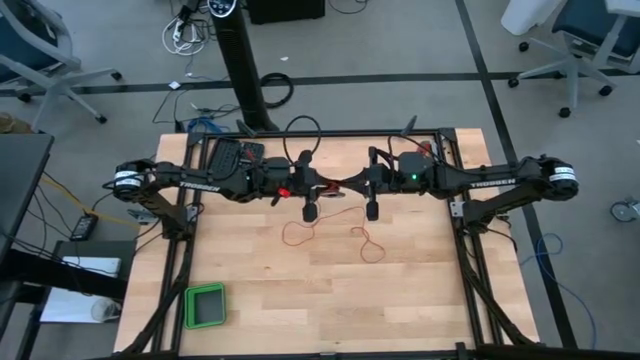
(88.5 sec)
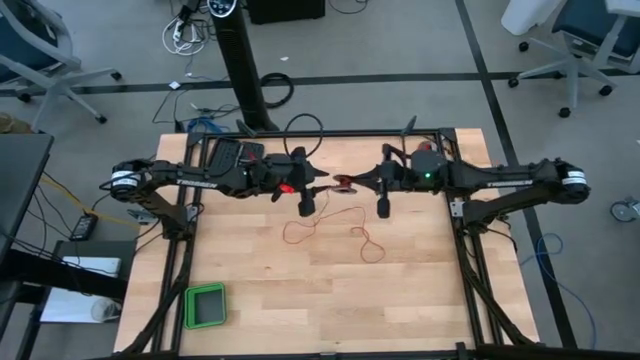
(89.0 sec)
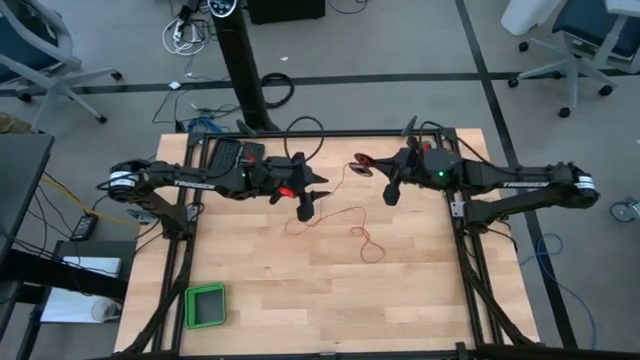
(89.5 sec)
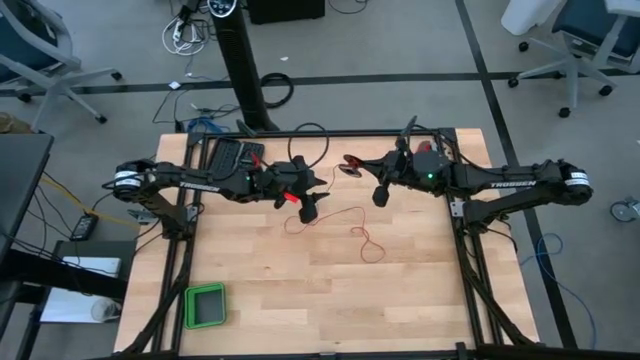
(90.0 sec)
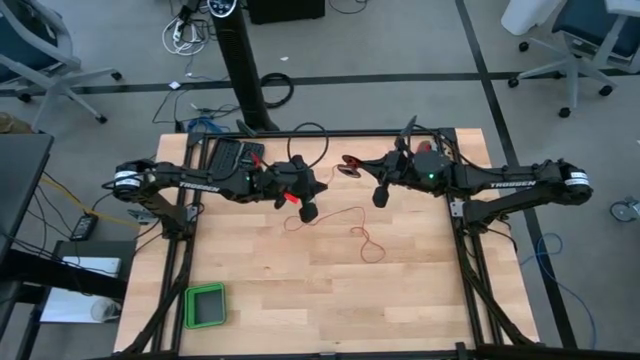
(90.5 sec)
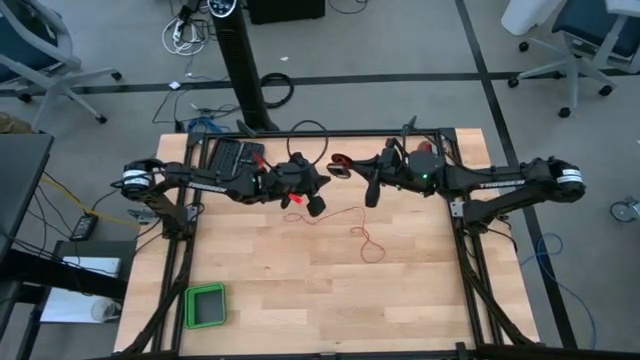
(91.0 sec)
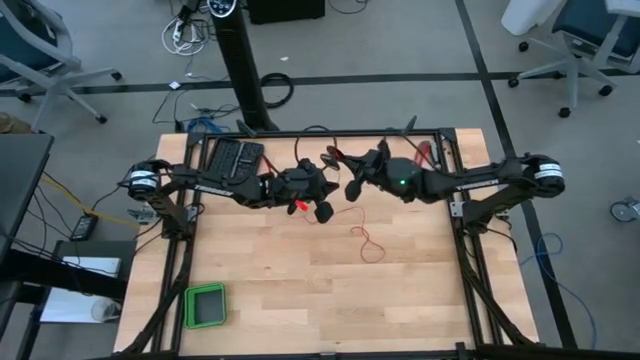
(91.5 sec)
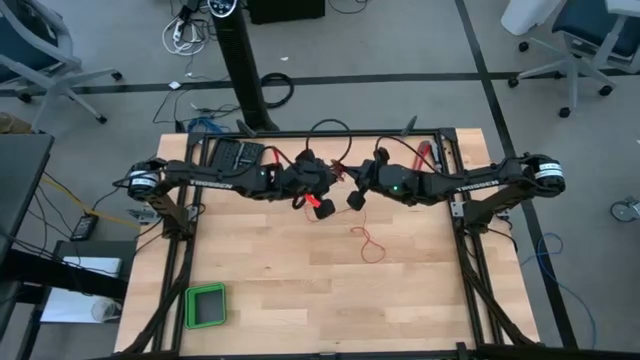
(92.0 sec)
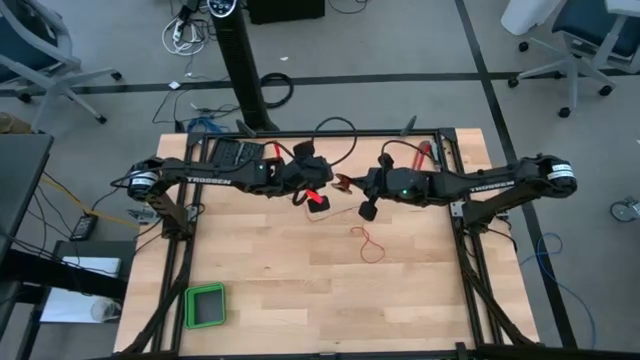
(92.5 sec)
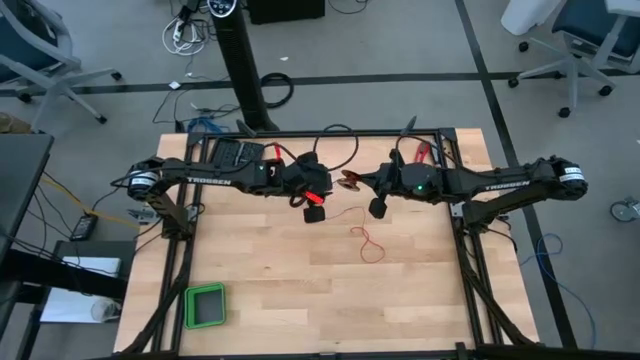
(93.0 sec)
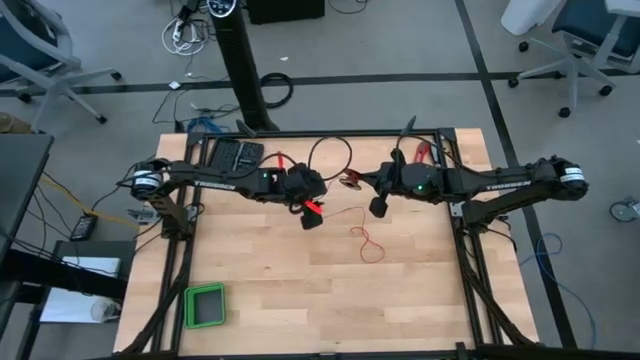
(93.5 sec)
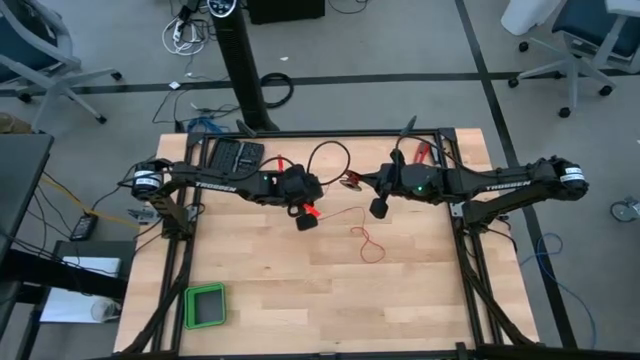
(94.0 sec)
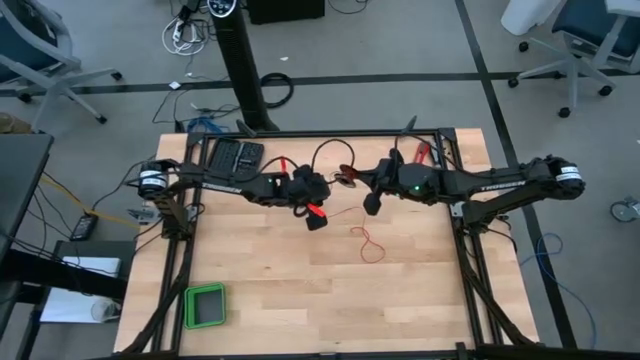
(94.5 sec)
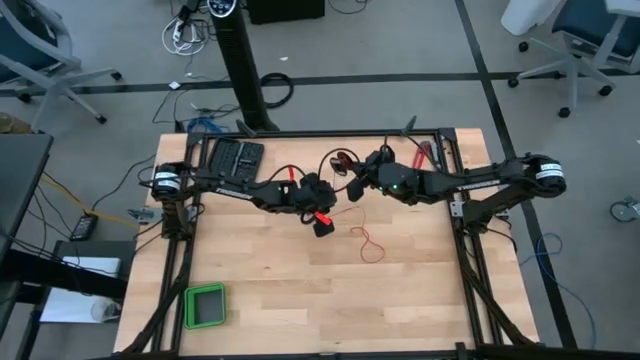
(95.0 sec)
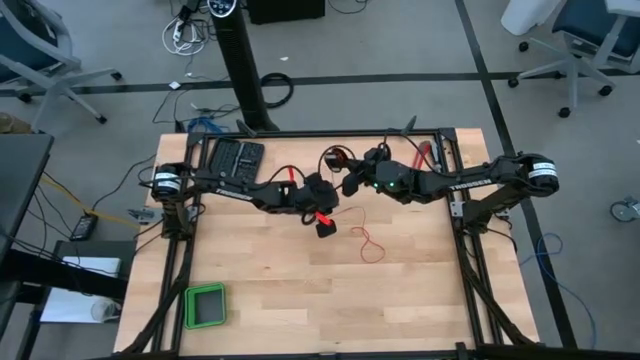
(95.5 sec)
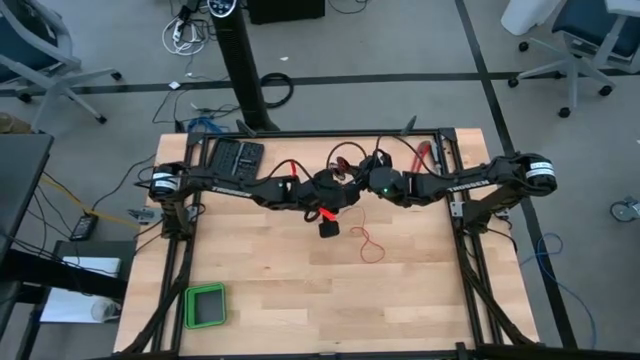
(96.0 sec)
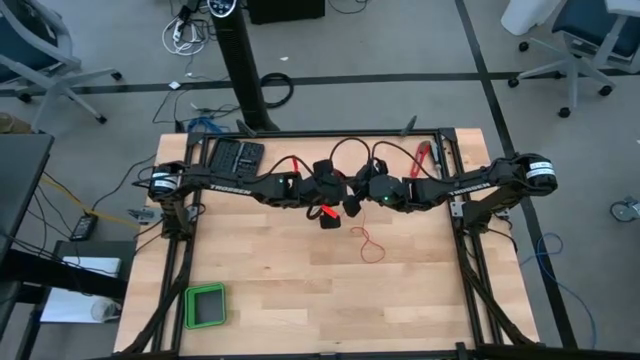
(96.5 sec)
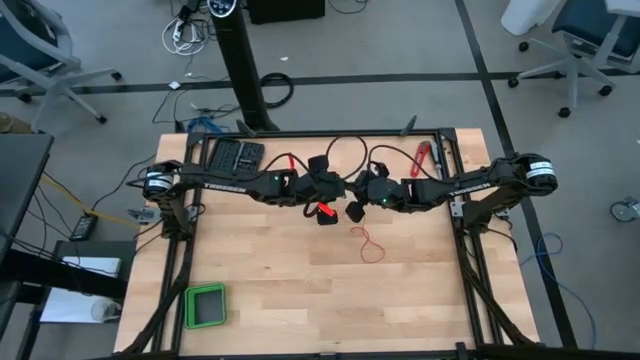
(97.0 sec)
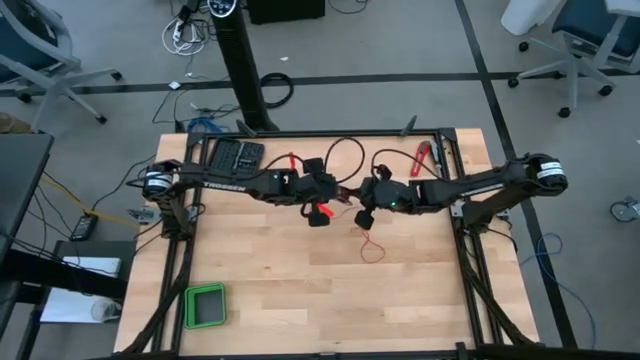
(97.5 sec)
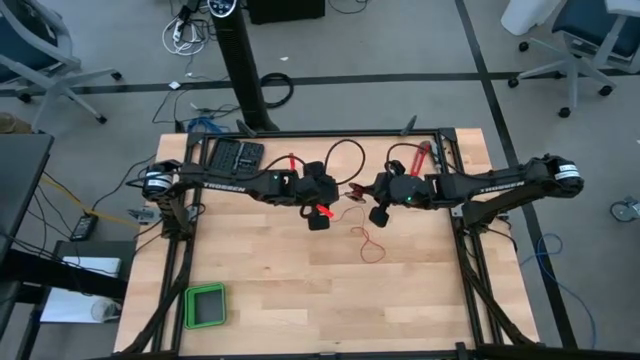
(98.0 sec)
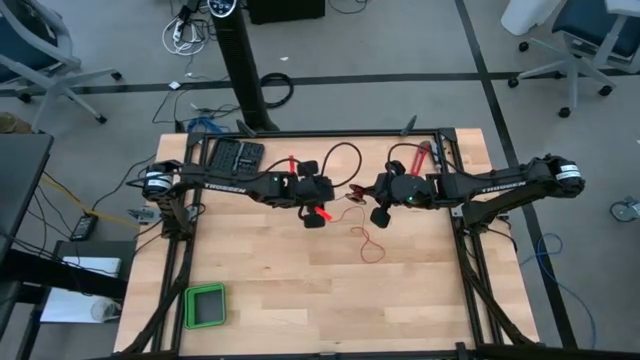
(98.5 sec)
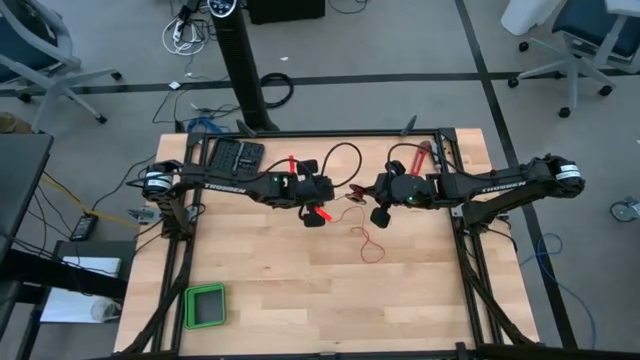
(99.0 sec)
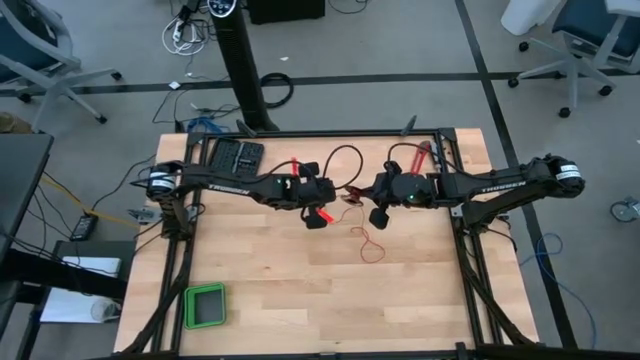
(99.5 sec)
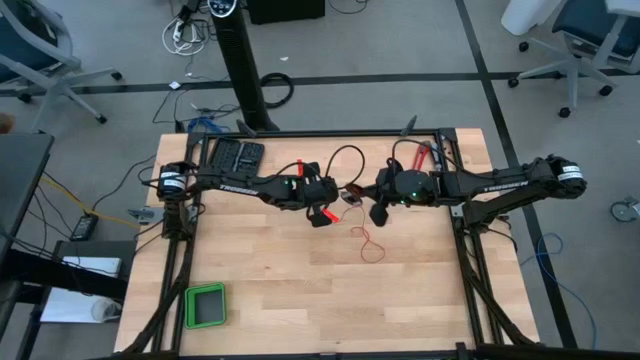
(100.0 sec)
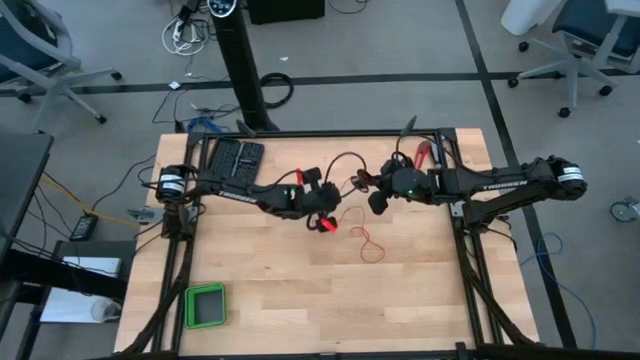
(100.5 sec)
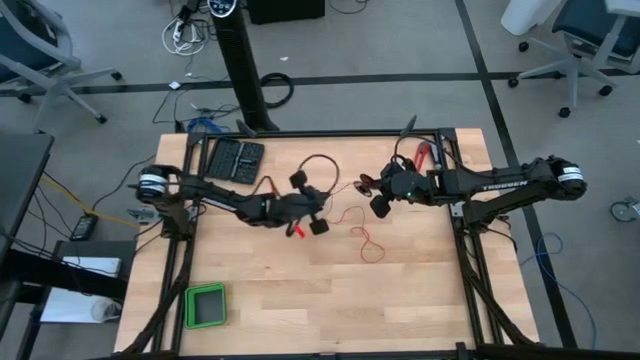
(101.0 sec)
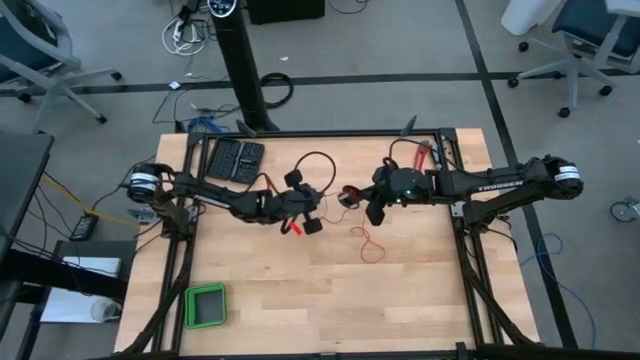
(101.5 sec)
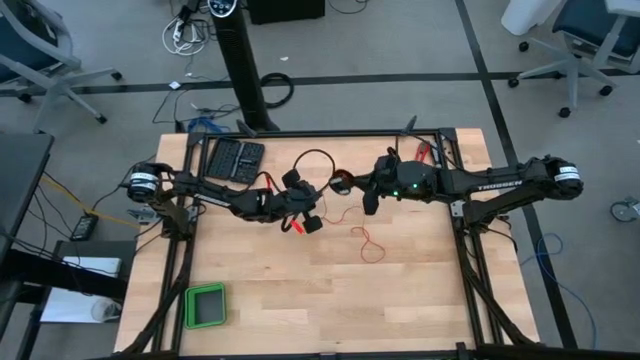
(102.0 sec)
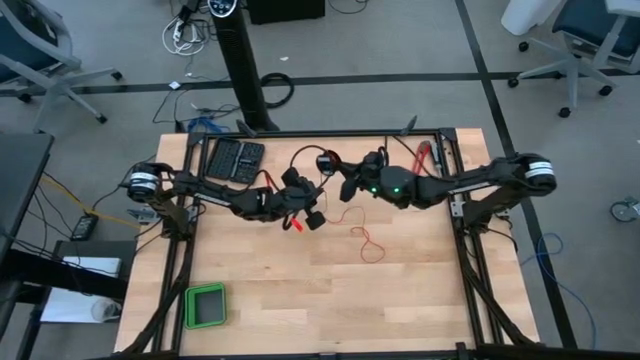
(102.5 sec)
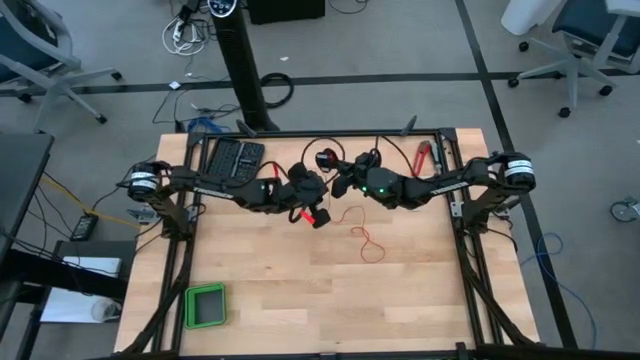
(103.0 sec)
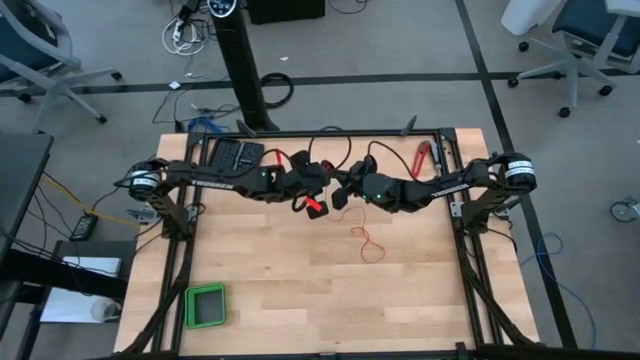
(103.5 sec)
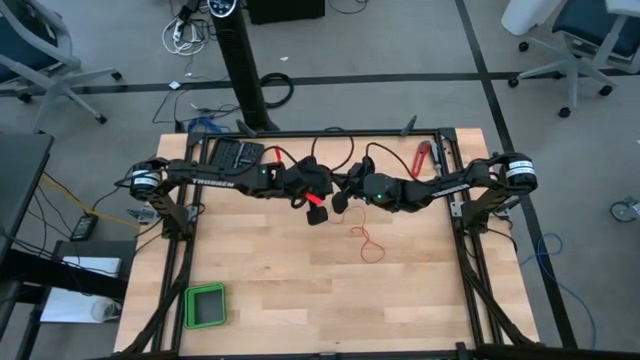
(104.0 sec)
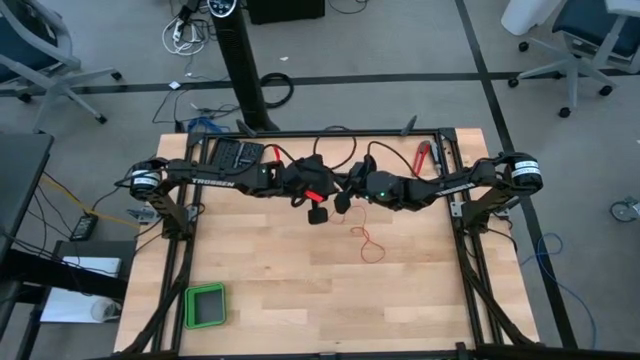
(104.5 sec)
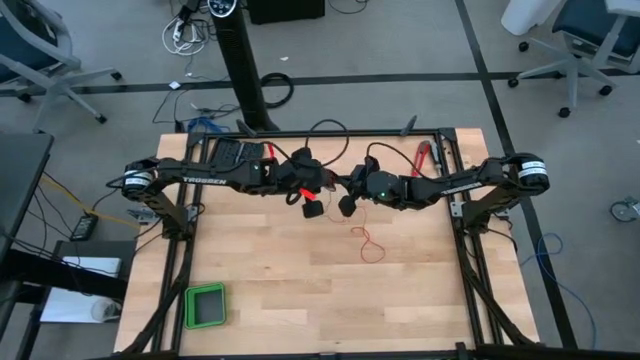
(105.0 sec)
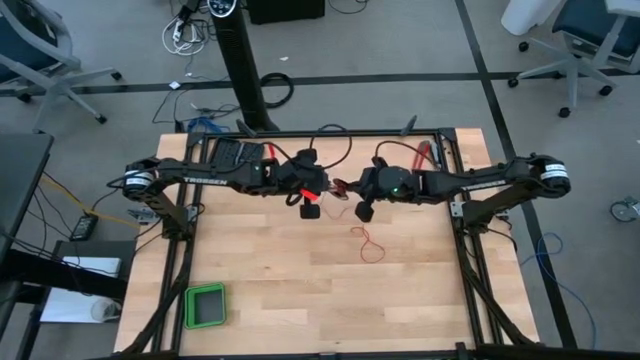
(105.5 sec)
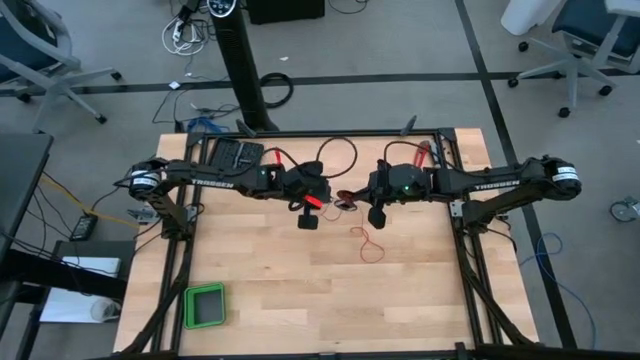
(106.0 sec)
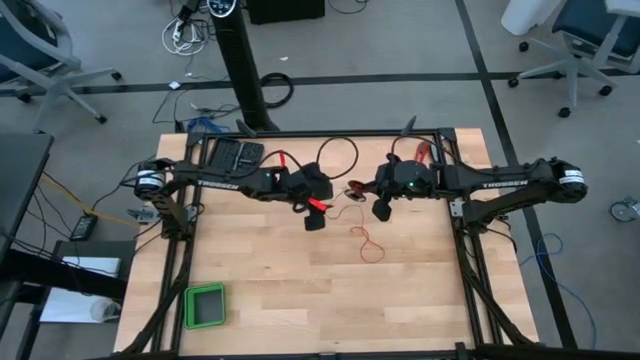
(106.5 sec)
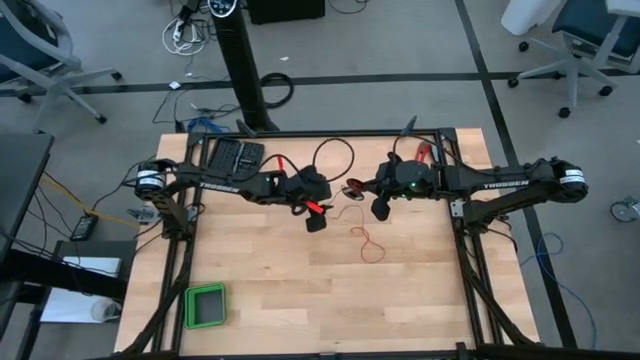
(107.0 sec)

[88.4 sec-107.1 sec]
Task: Coil cords
Coil the red wire onto the black spool

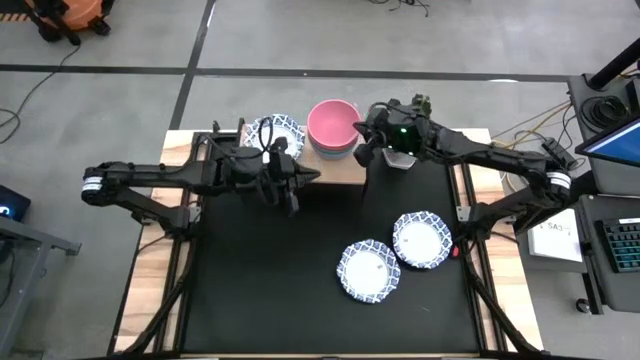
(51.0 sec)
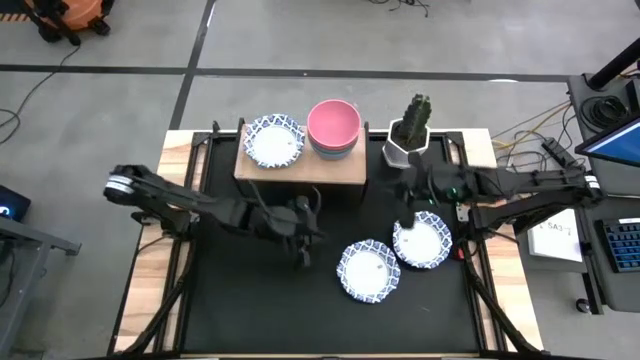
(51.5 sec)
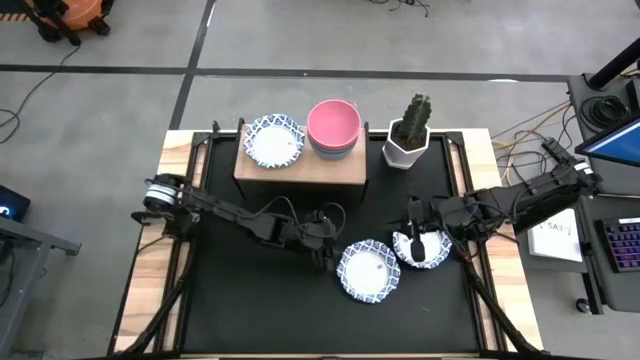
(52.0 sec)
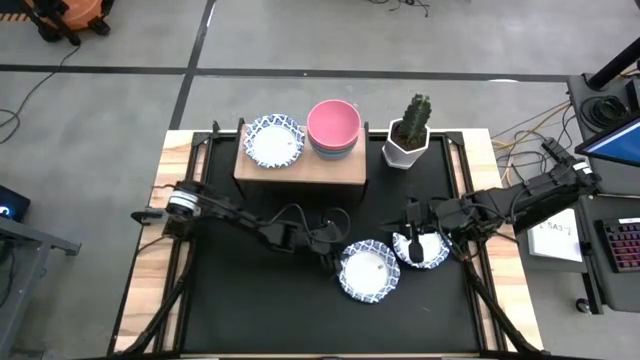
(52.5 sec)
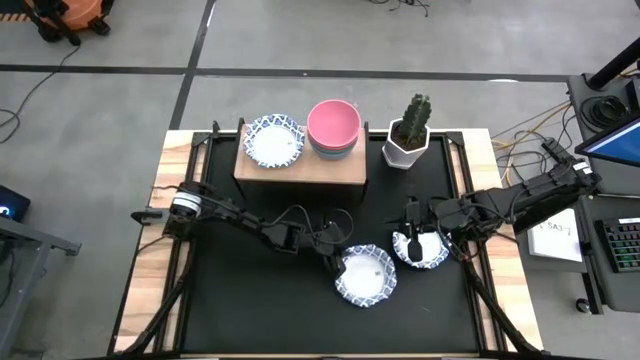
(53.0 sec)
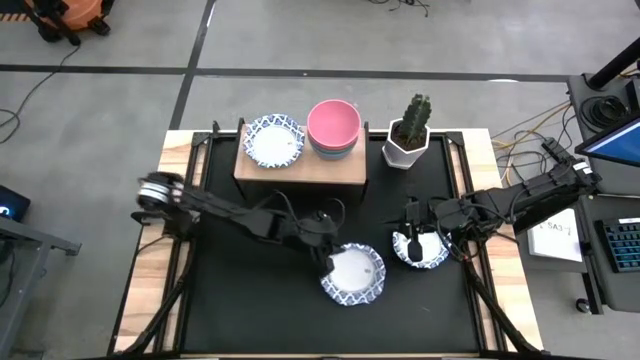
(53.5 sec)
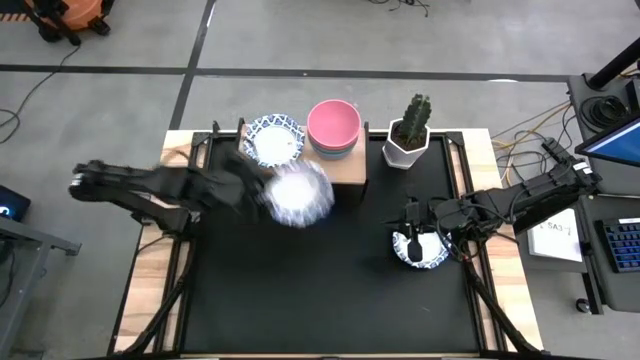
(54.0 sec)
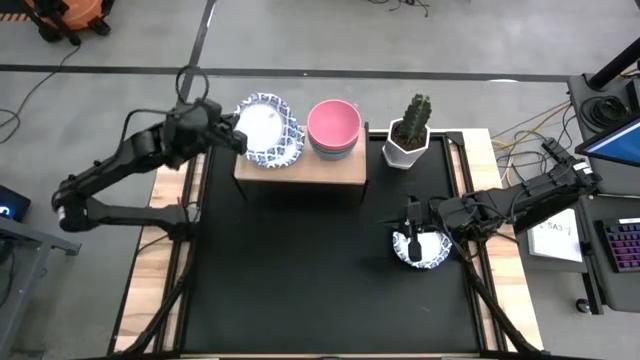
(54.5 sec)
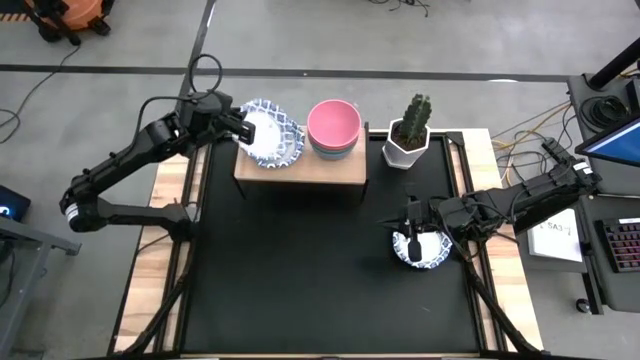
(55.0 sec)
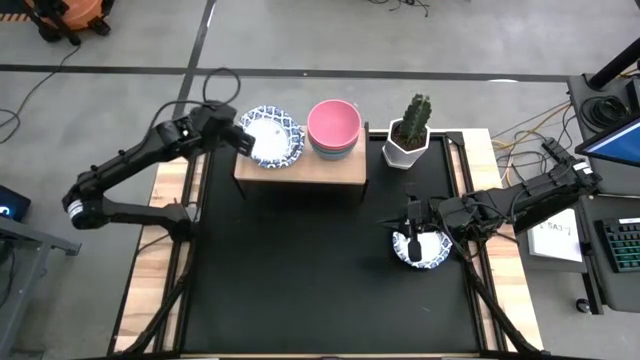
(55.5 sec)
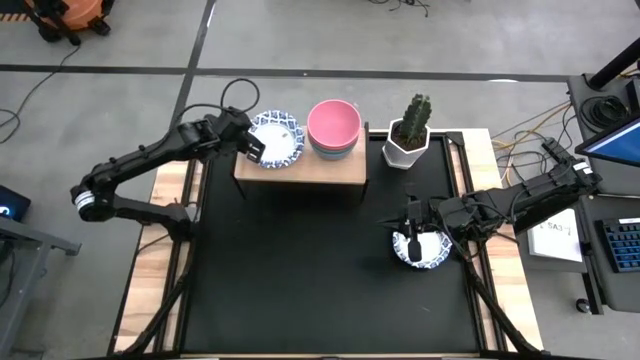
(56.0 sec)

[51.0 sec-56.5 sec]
Task: Place and stack bowls onto a shelf
Stack the blue patterned bowl on top of the blue patterned bowl on the shelf
